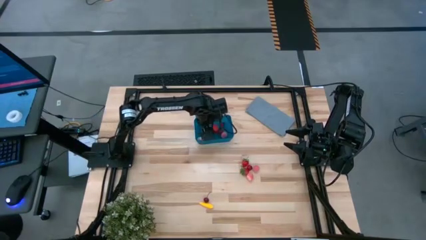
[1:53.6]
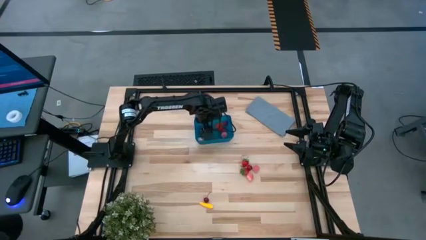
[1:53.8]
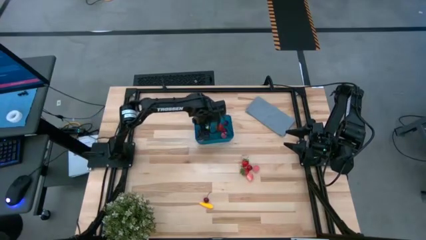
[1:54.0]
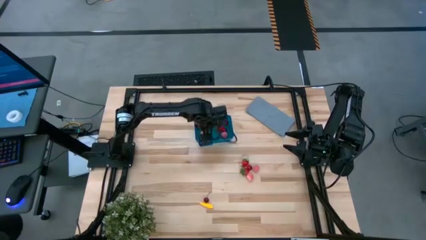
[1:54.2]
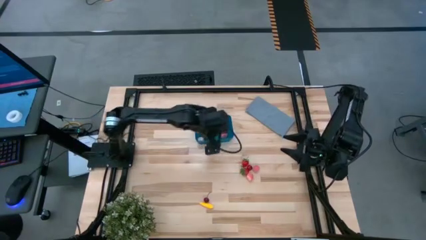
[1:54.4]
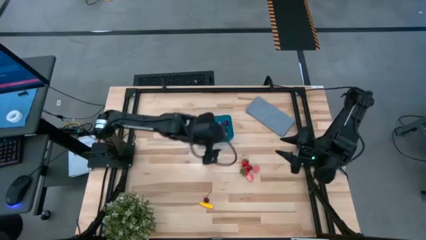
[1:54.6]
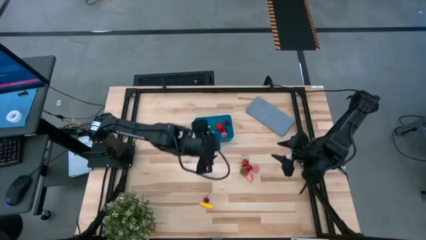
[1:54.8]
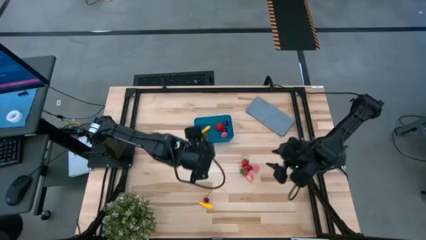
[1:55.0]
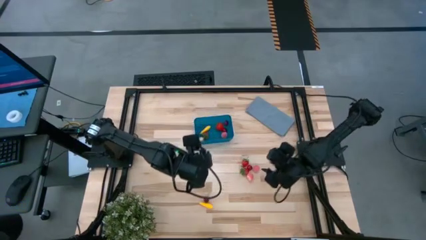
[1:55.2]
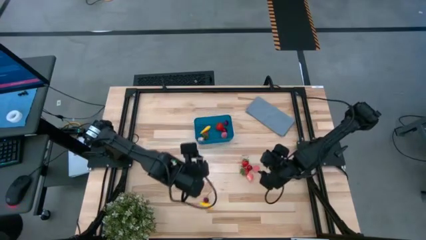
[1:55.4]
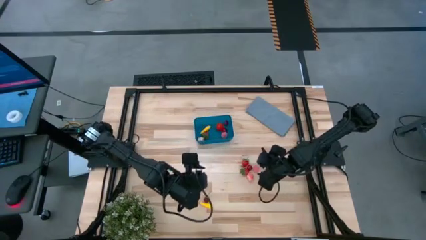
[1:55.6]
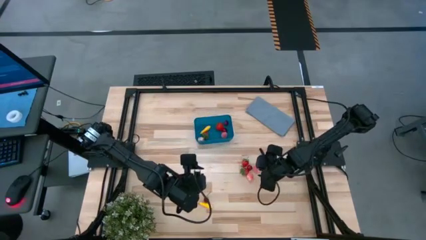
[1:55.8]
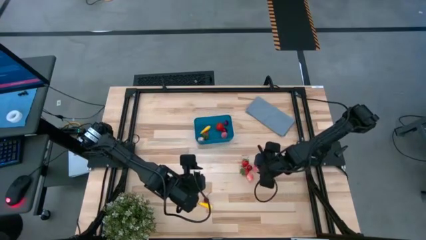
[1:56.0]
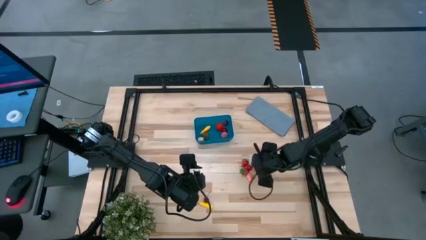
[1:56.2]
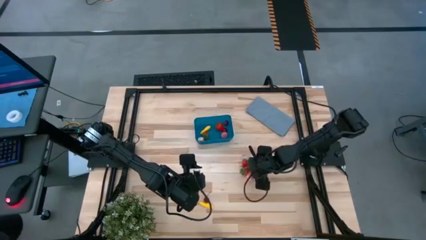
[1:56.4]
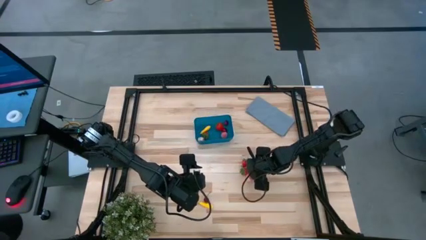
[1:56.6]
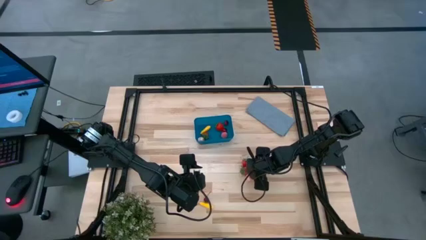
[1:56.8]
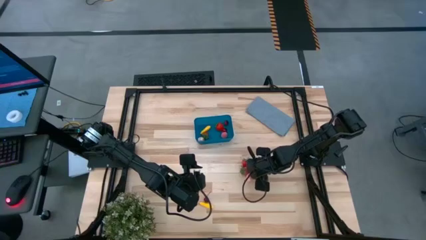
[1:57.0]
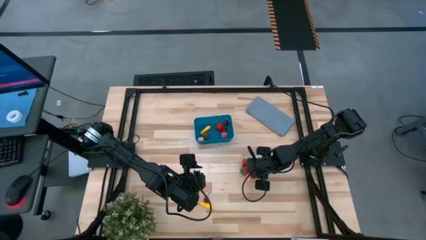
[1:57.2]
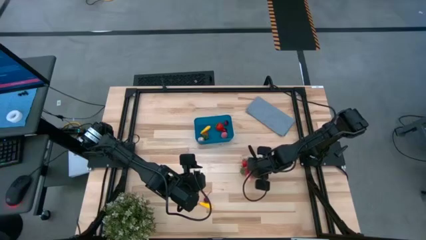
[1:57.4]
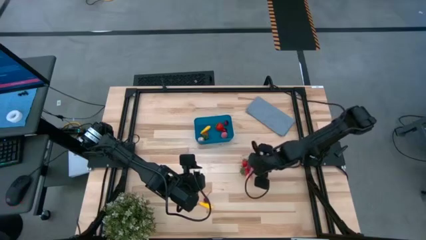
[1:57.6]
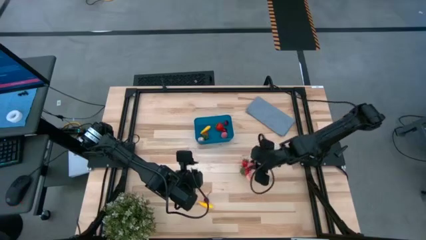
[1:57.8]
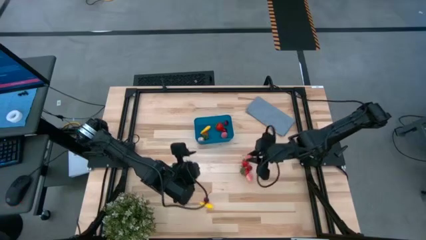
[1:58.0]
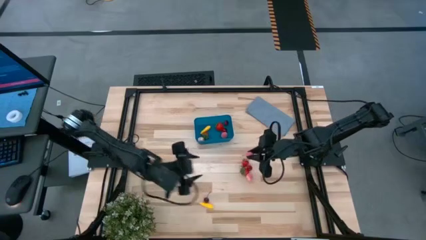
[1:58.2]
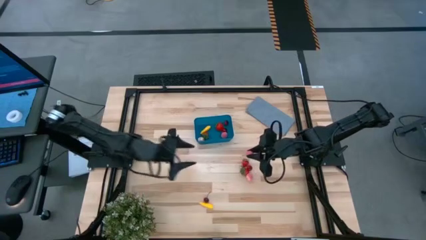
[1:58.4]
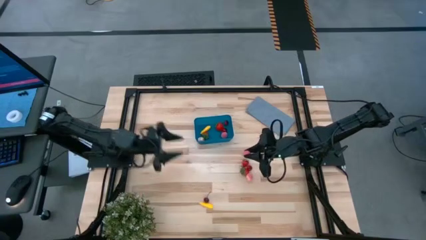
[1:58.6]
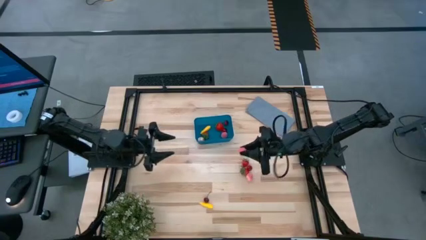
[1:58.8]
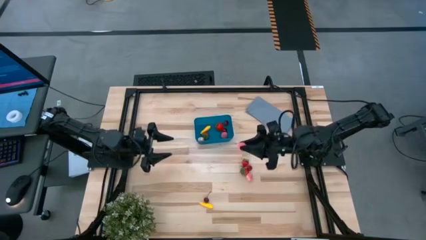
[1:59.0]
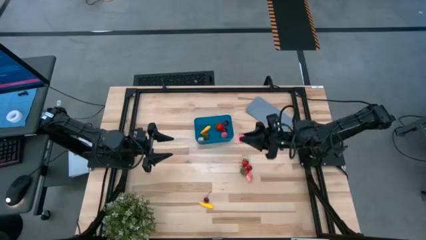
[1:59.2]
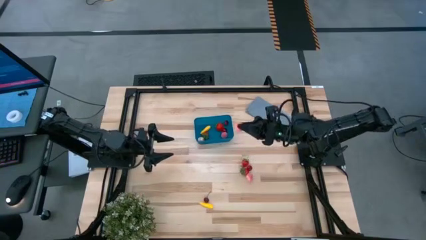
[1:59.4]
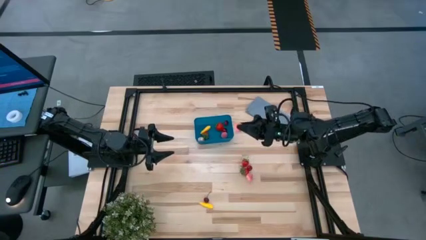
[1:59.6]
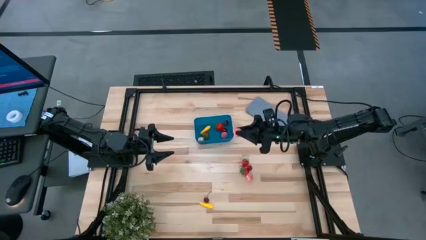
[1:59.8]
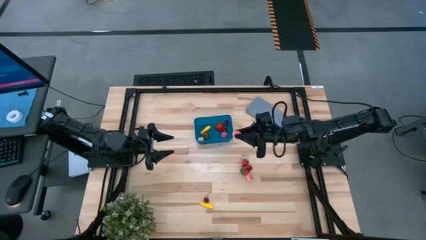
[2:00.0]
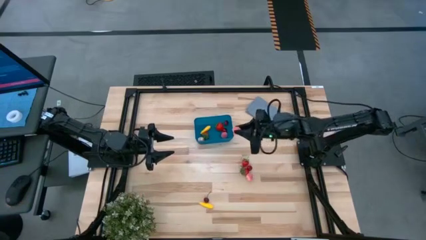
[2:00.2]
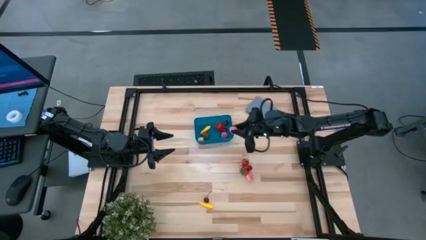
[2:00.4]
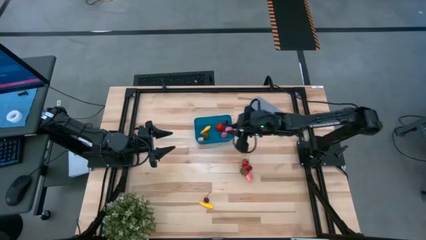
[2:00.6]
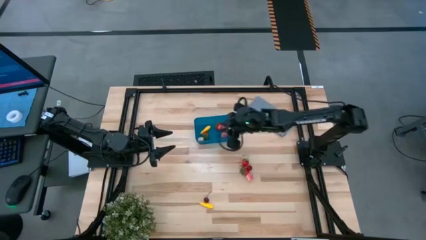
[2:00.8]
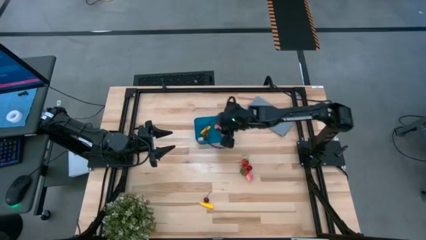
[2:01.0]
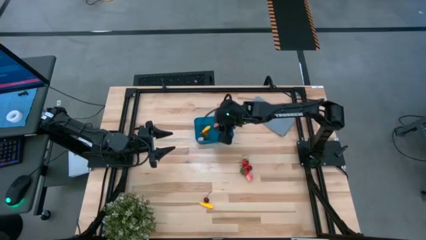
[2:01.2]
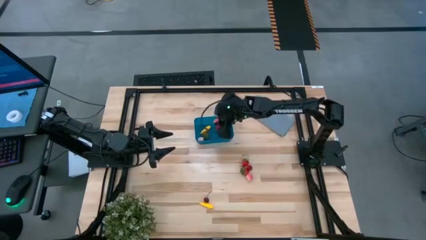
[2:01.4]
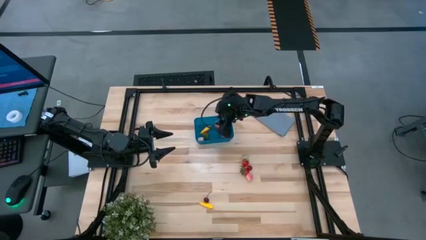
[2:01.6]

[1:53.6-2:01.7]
Task: Pick and placing Produce into tupperware
Put the peach into the blue bin

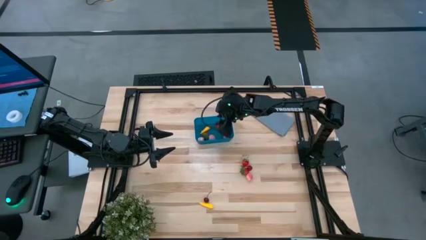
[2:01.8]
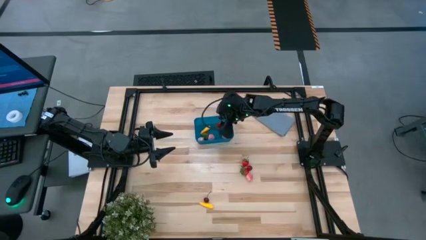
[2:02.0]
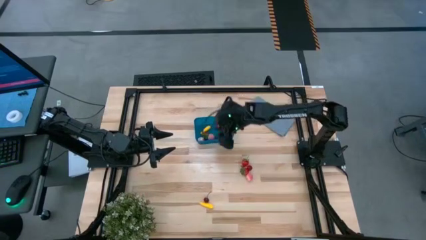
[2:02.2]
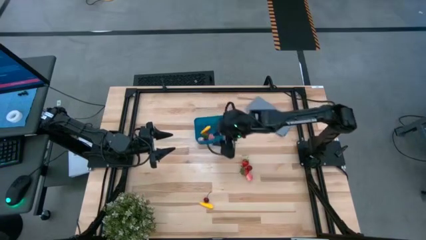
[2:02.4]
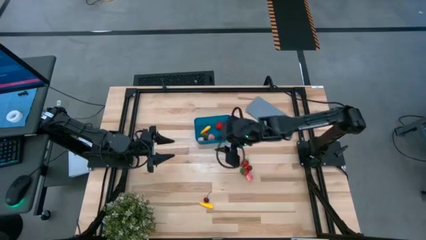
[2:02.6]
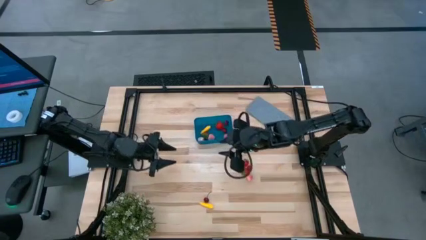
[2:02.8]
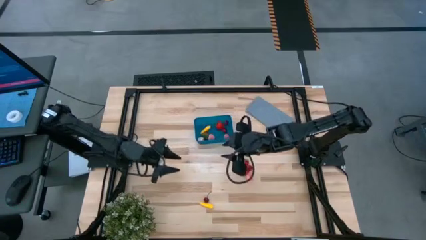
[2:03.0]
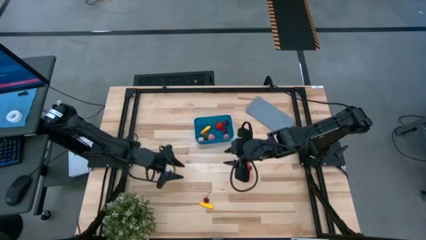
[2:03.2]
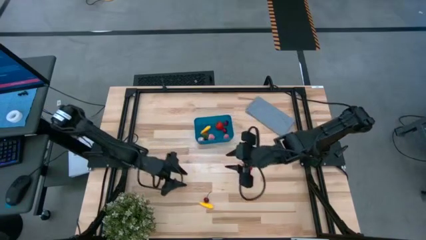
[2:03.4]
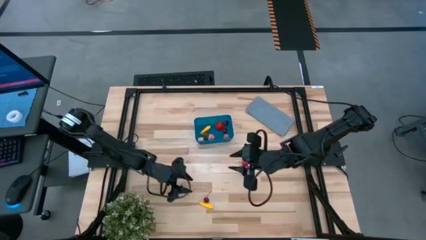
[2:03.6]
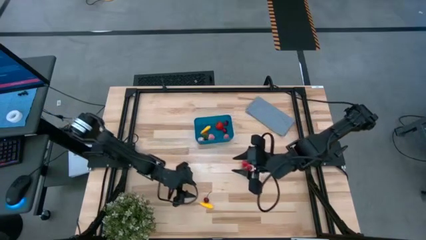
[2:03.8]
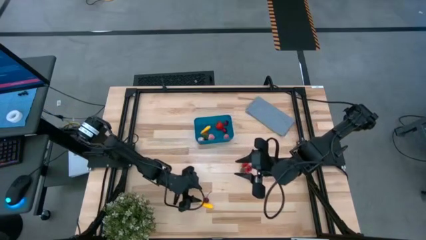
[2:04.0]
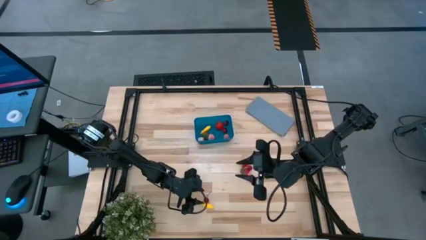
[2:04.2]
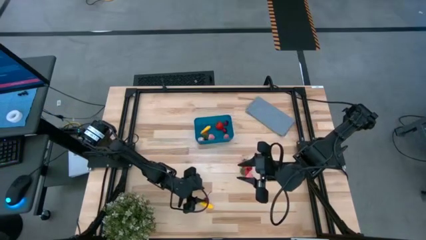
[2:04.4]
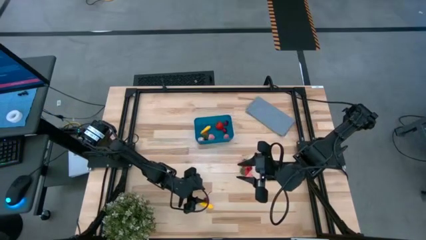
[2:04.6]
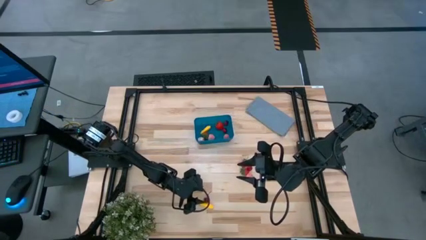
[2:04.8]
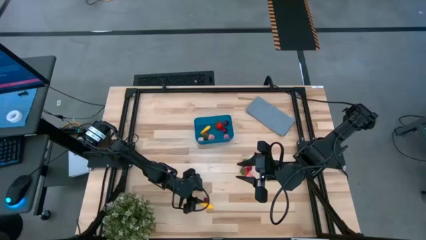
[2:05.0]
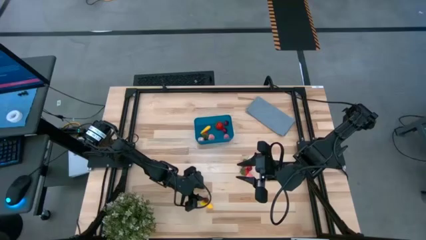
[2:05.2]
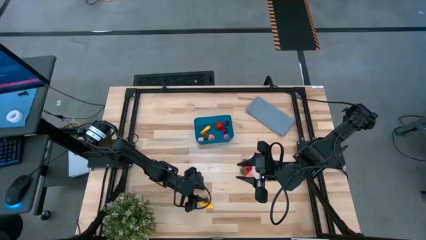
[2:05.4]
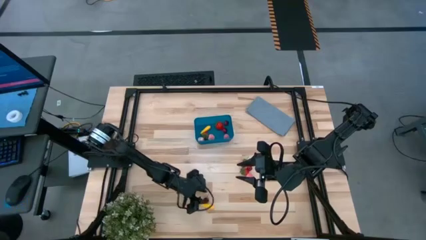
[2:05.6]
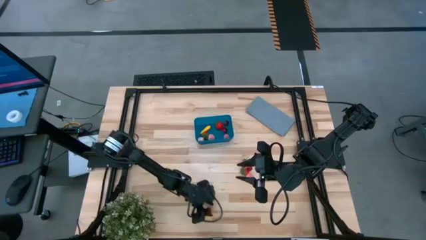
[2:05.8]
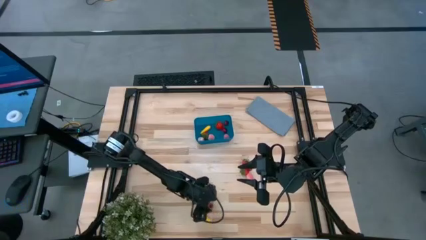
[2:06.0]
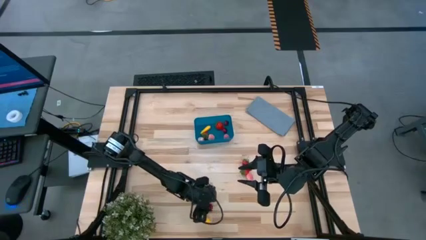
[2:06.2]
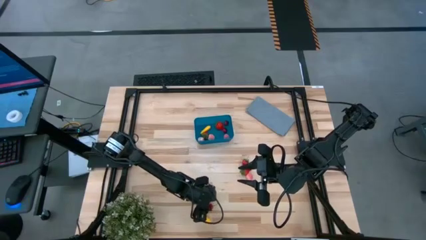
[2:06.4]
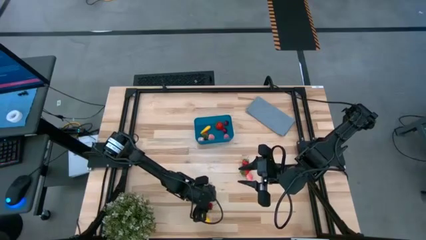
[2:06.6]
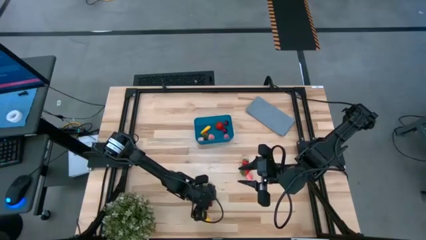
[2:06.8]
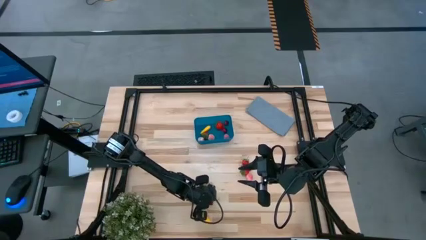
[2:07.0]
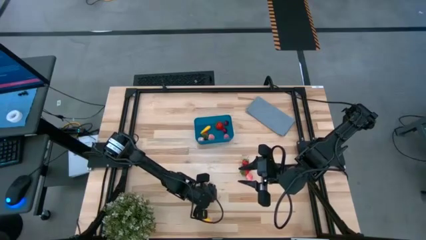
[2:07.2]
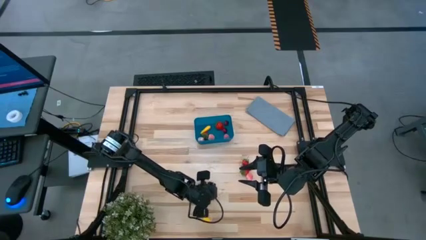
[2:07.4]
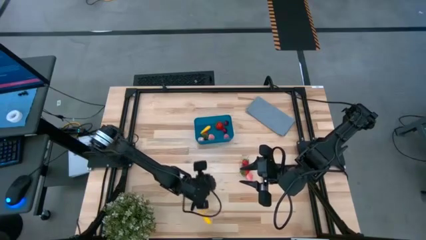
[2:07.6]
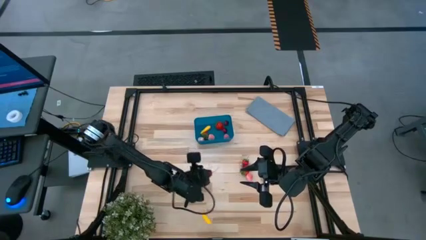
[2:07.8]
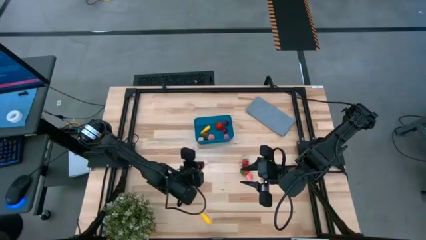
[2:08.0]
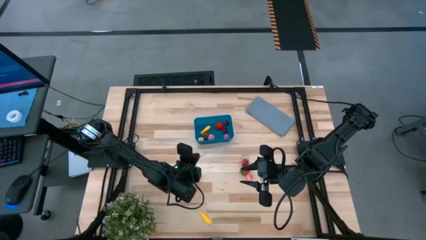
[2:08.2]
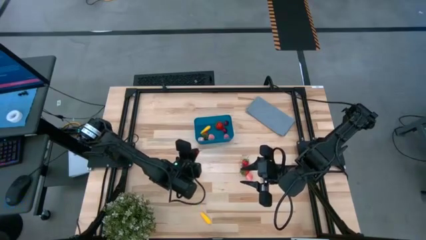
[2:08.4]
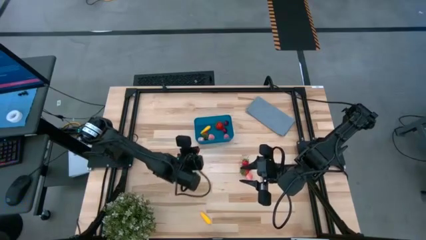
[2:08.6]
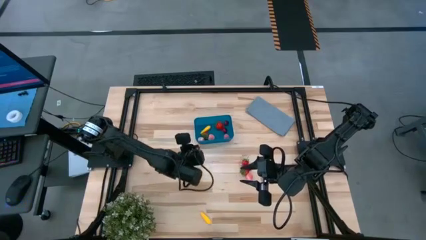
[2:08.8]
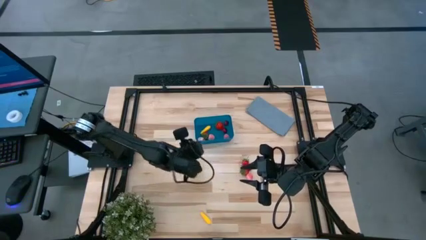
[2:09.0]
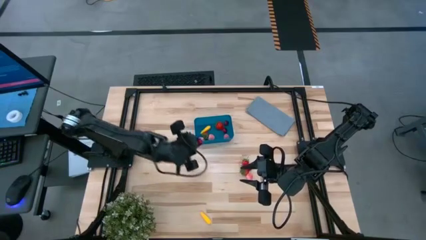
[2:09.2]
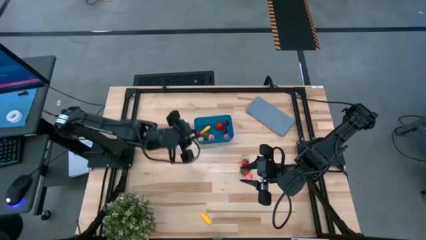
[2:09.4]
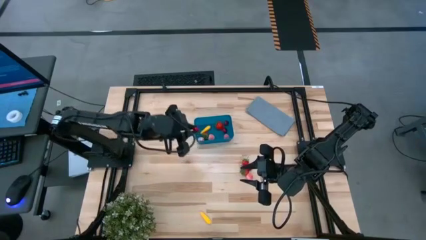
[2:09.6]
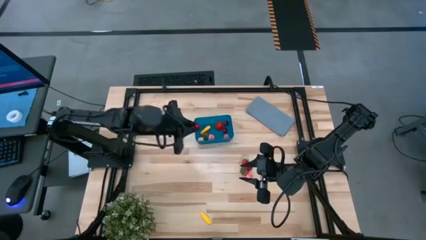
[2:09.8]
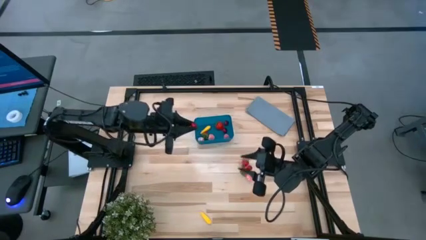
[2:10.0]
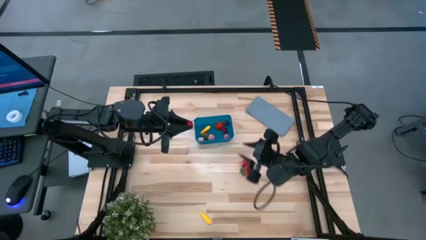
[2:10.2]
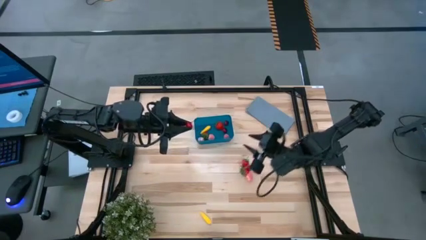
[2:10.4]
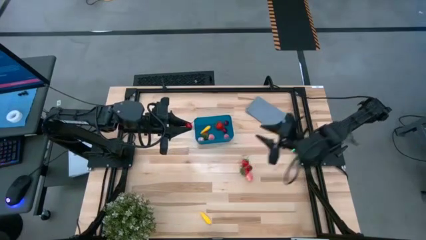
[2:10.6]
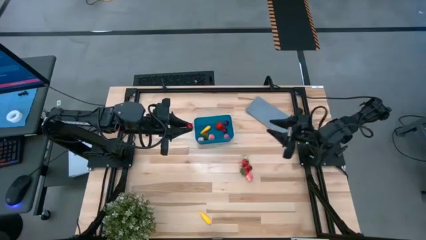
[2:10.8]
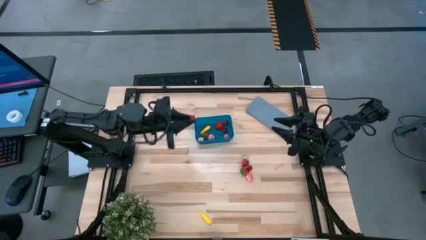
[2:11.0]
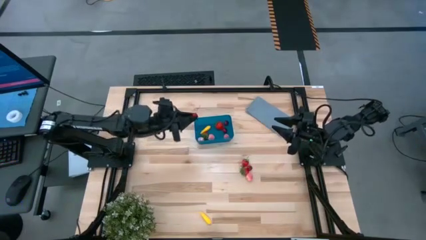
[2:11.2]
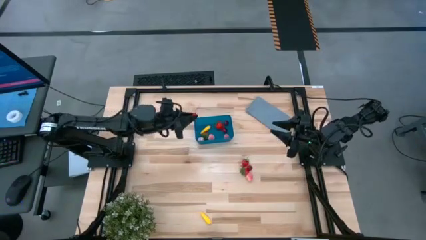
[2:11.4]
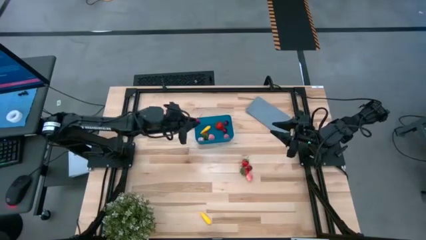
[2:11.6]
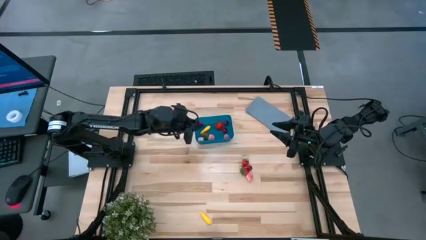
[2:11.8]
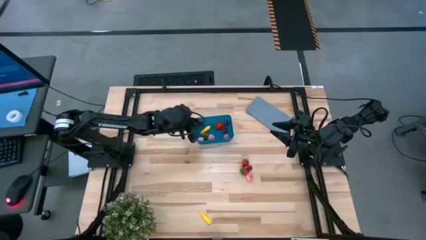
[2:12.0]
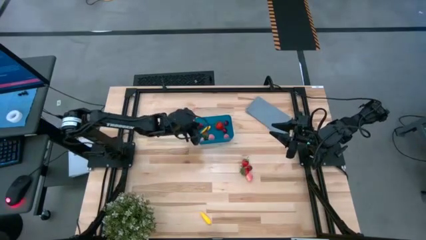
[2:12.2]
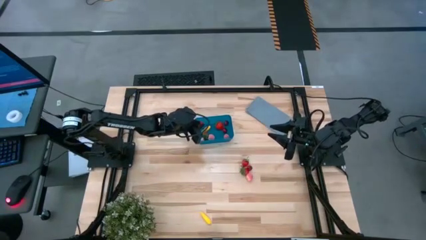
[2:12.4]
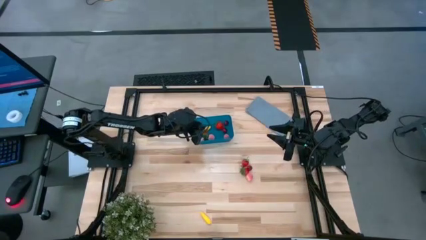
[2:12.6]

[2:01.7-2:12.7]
Put the red cherry into the blue bin
